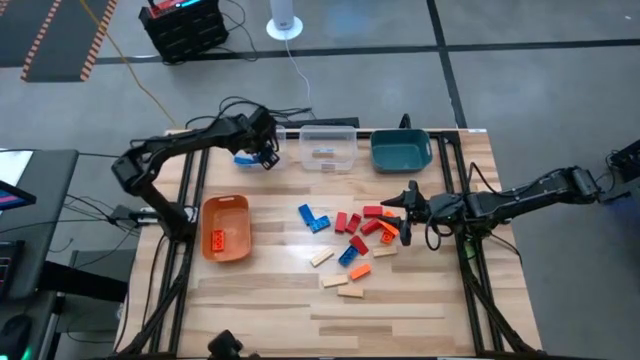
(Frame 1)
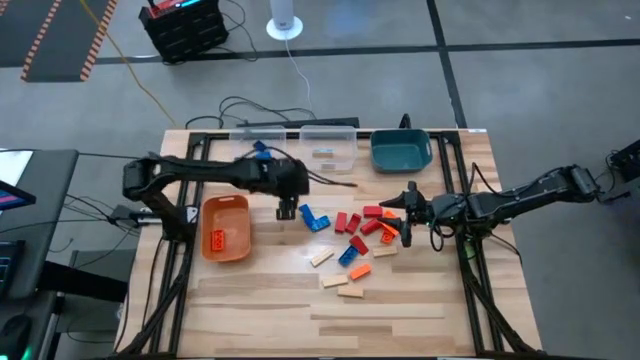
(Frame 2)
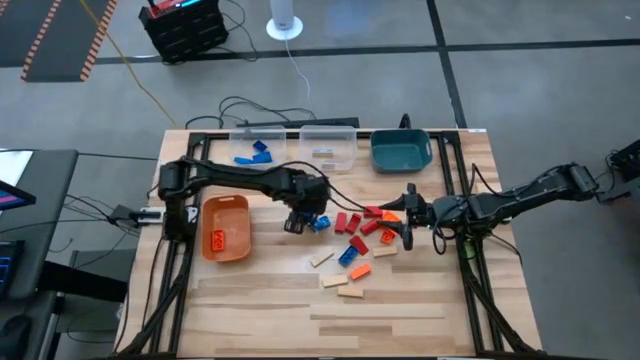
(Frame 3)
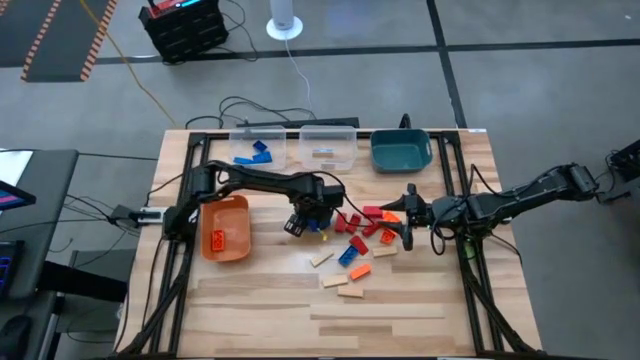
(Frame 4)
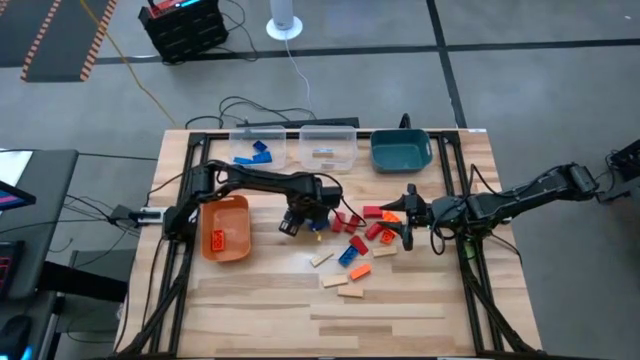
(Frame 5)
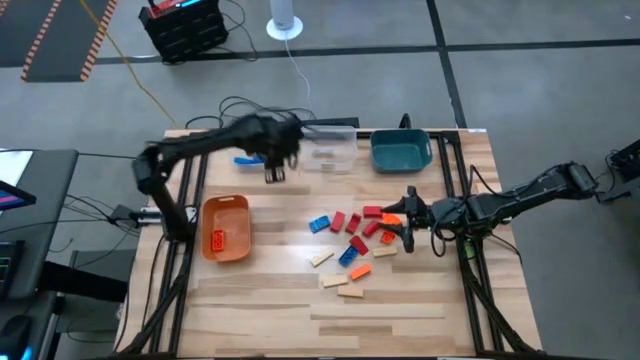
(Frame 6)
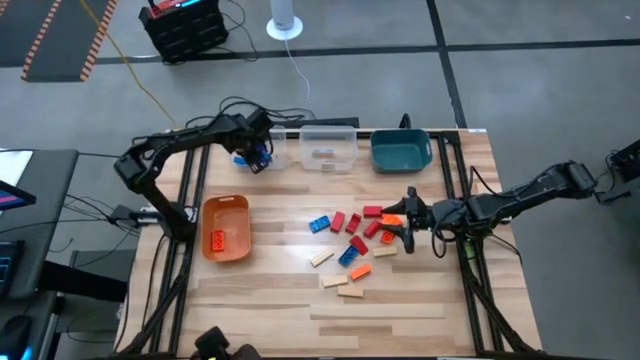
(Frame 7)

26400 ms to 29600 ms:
Task: Sort blocks
Put the blue game piece into the left transparent bin

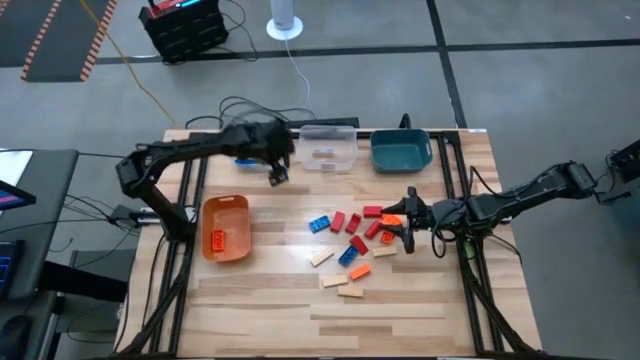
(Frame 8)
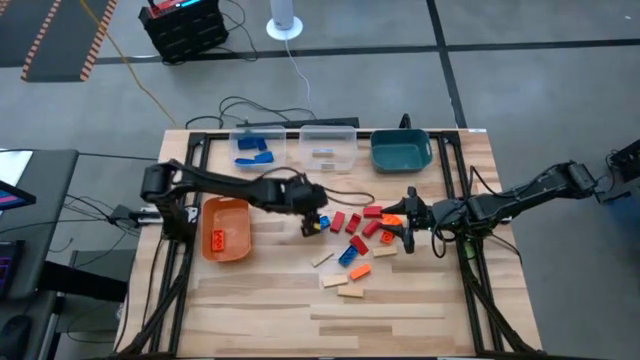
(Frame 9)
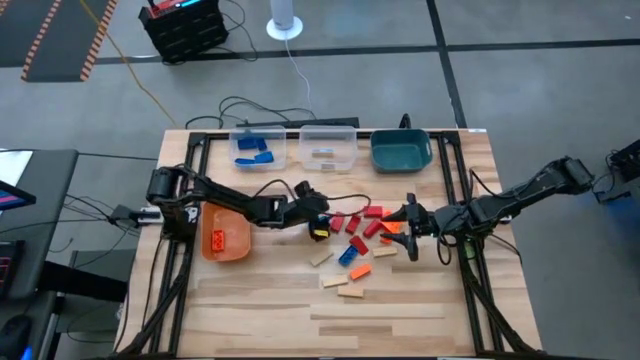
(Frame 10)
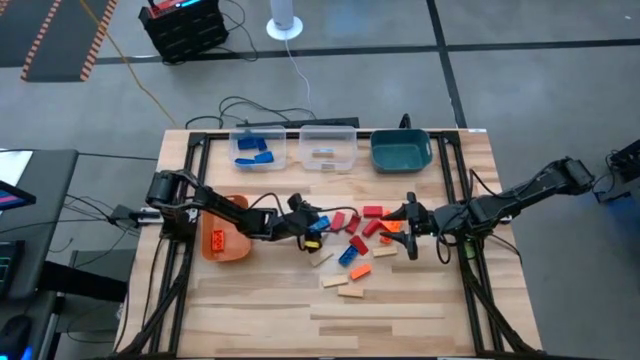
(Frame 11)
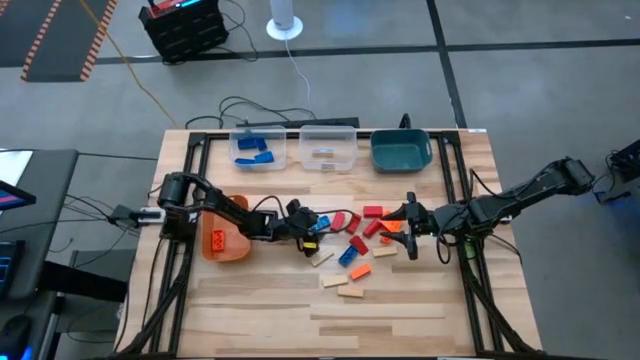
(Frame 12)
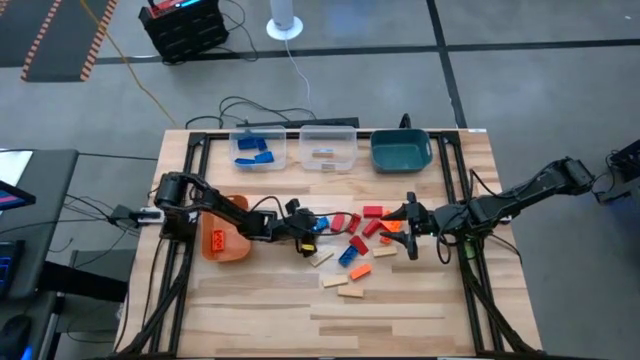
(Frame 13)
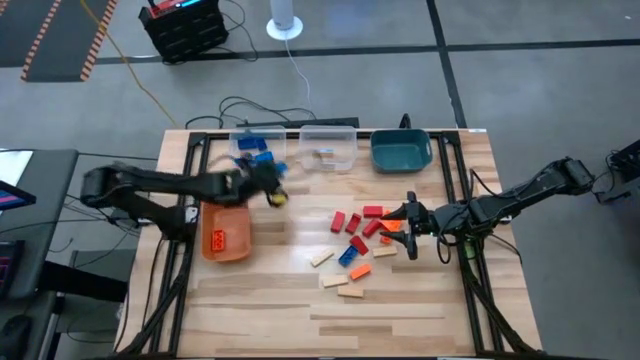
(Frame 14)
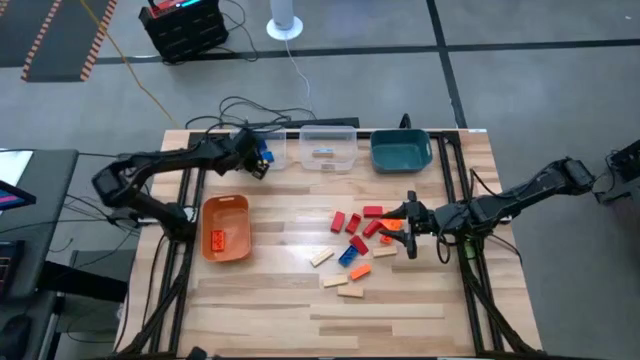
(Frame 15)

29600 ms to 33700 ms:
Put the blue game piece into the left transparent bin

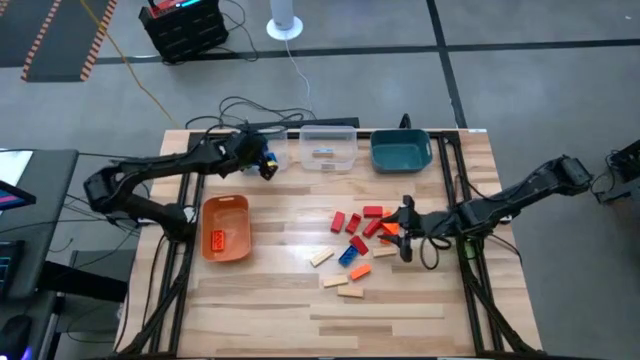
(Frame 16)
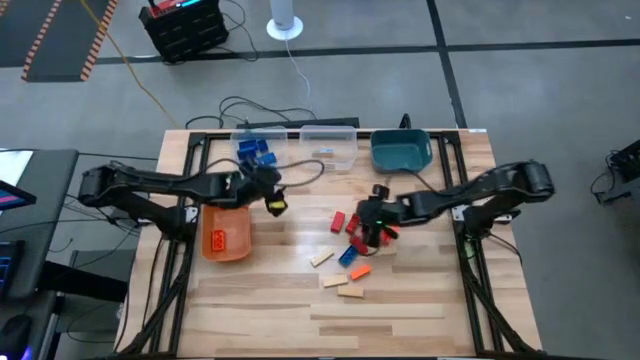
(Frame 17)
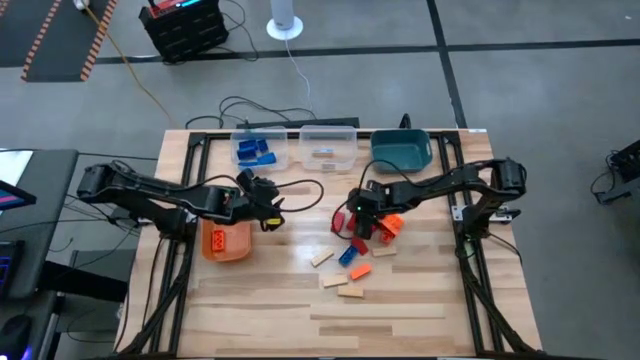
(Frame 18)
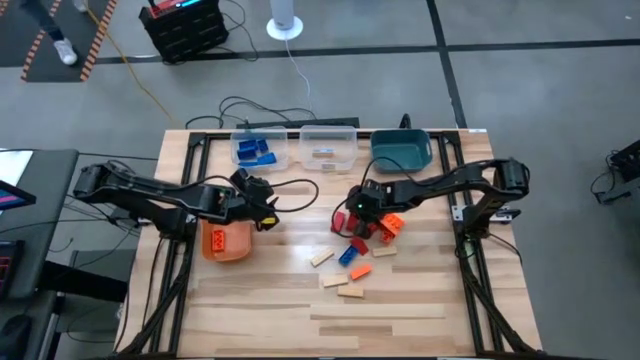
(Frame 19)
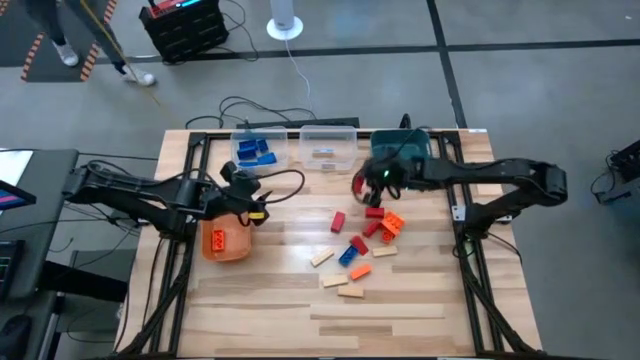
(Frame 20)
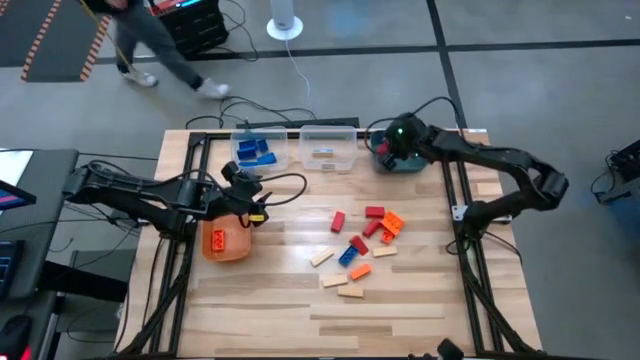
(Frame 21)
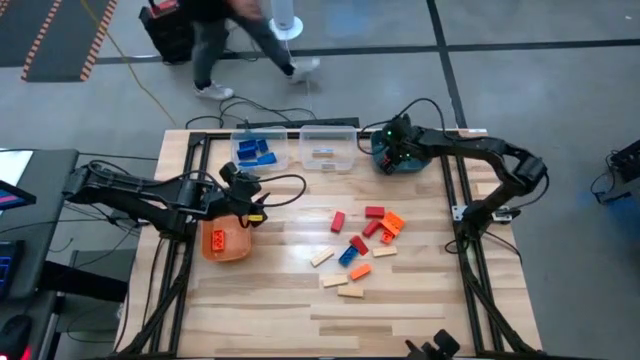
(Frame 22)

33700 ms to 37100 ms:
Put the red block into the blue bin

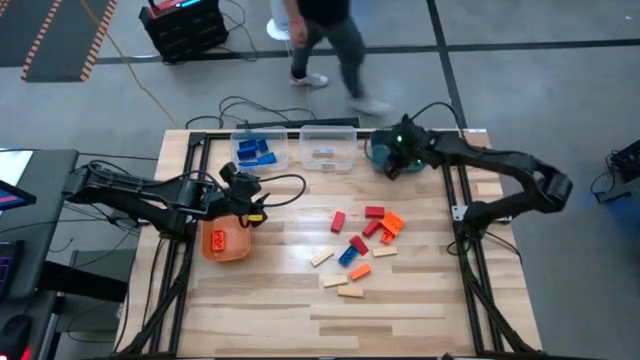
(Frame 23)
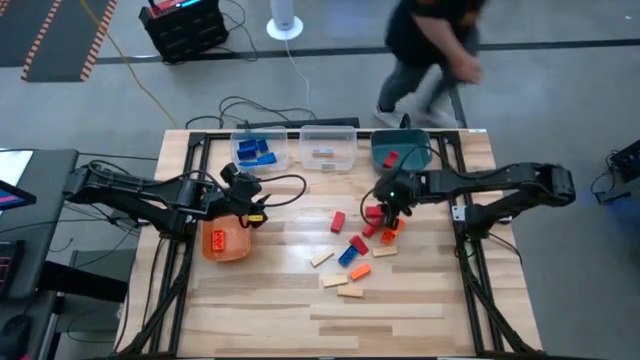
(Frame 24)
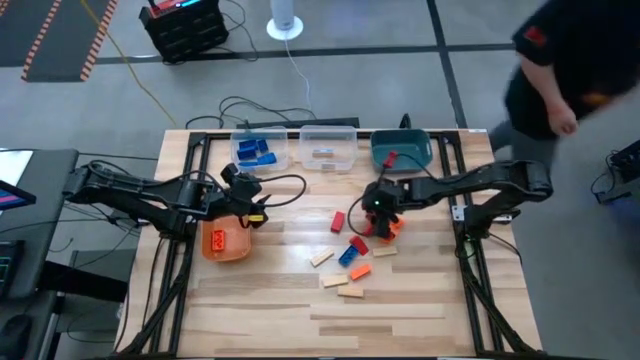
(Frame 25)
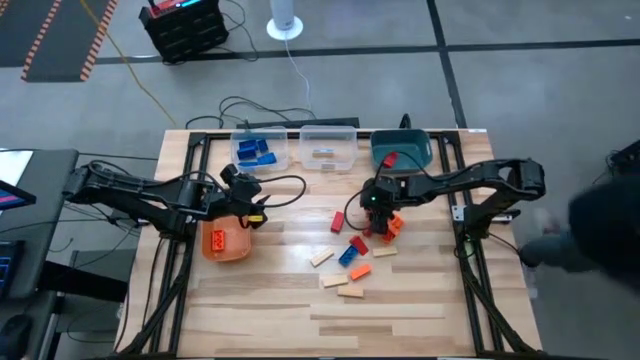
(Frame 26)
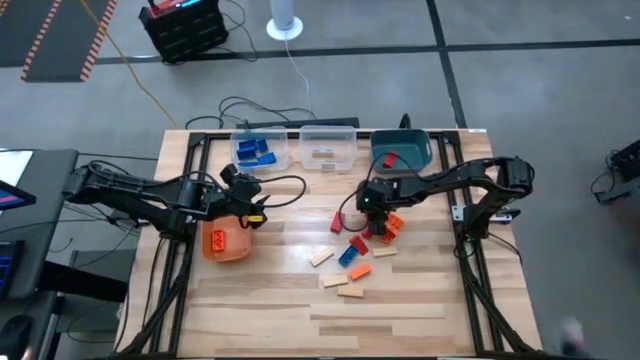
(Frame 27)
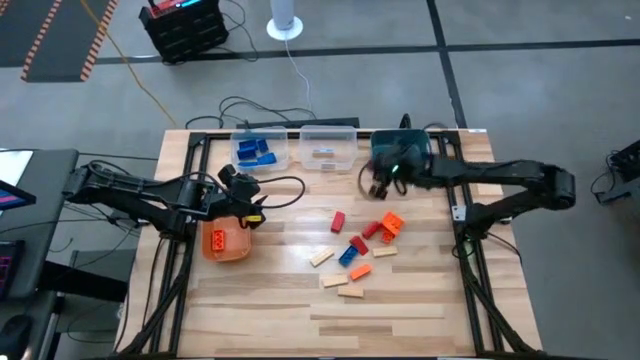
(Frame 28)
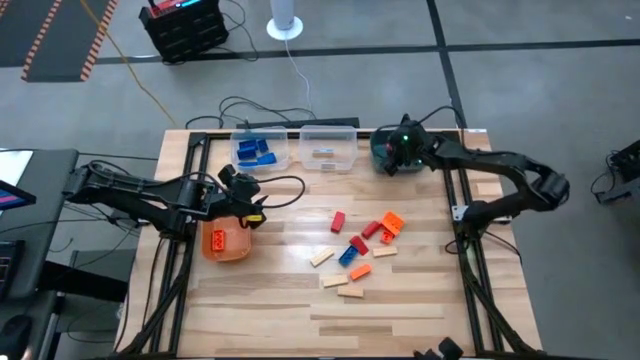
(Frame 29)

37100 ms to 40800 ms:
Put the red block into the blue bin

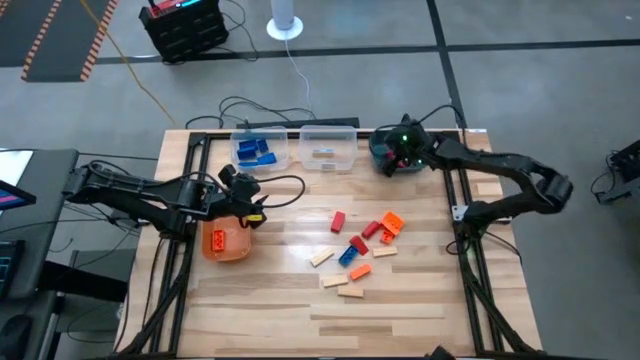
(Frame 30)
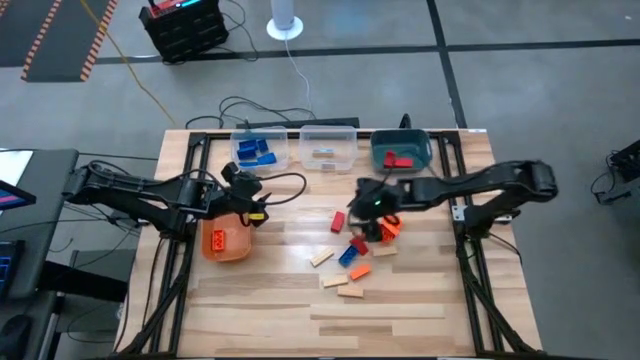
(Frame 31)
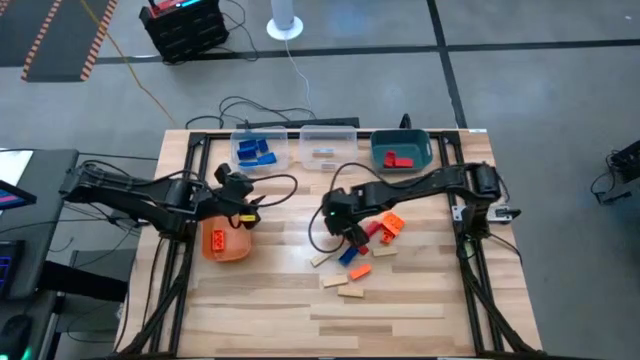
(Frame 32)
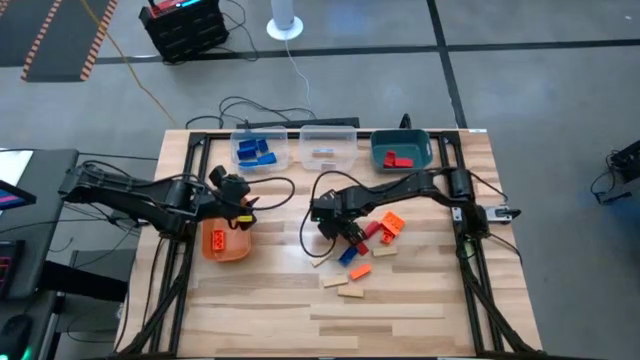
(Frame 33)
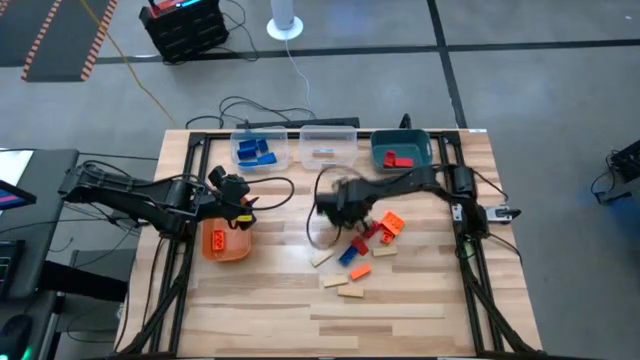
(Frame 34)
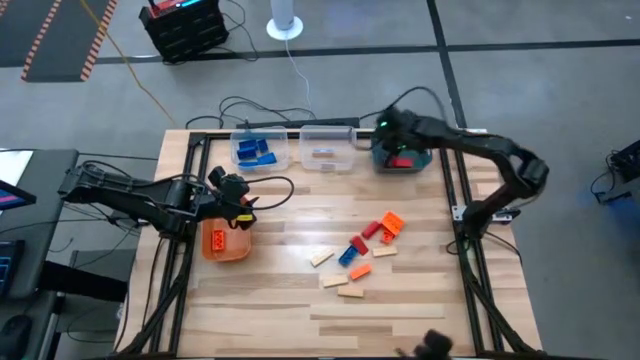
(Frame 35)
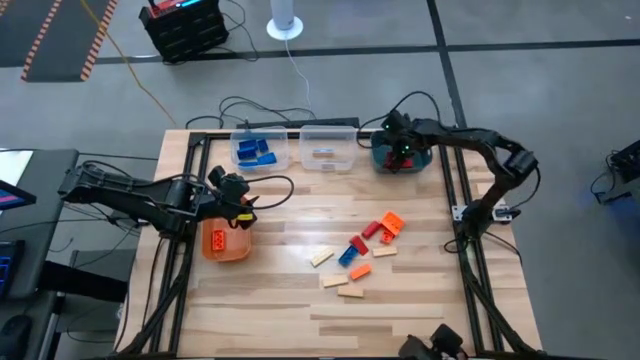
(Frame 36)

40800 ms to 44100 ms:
Put the red block into the blue bin

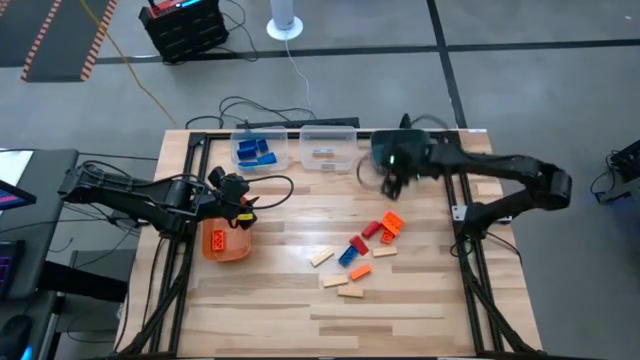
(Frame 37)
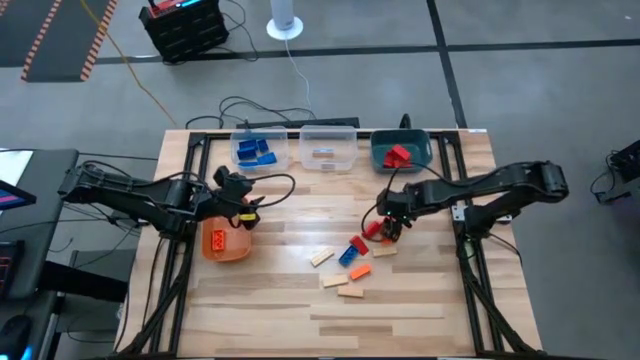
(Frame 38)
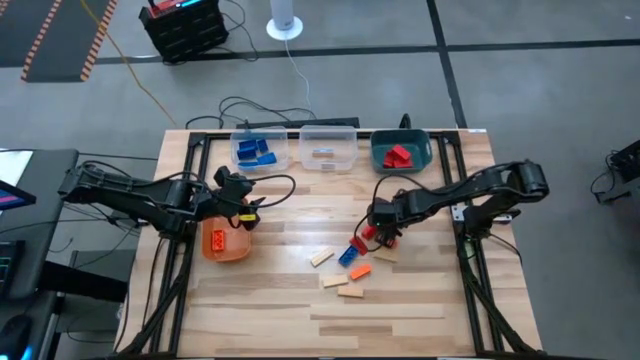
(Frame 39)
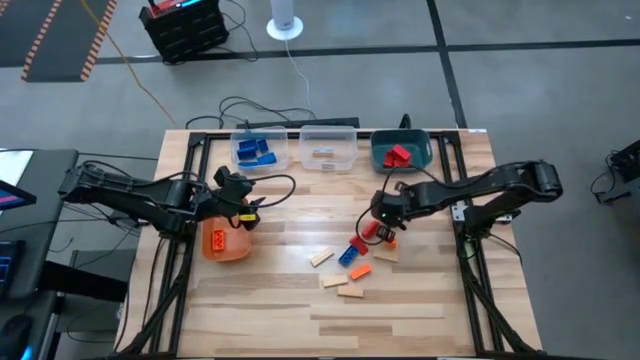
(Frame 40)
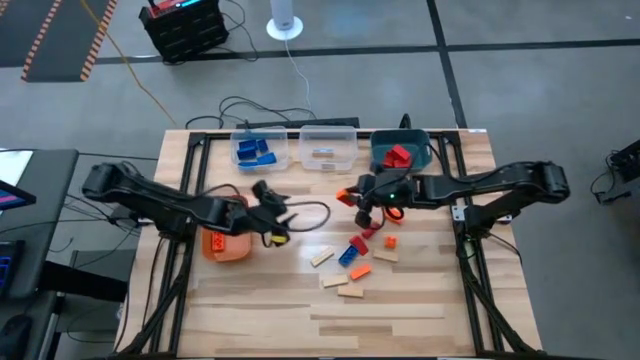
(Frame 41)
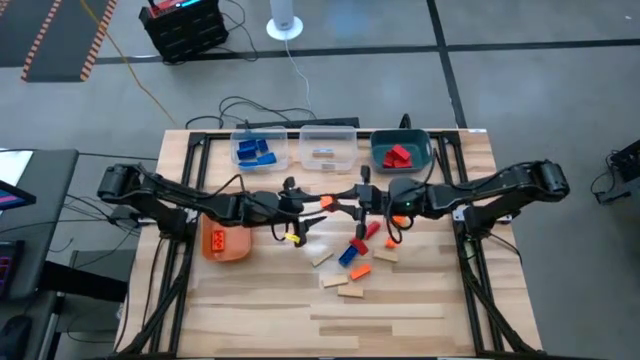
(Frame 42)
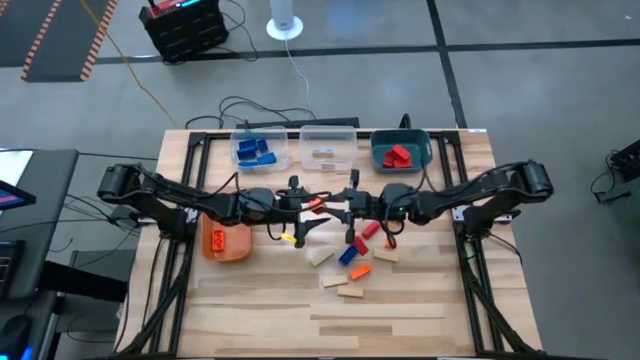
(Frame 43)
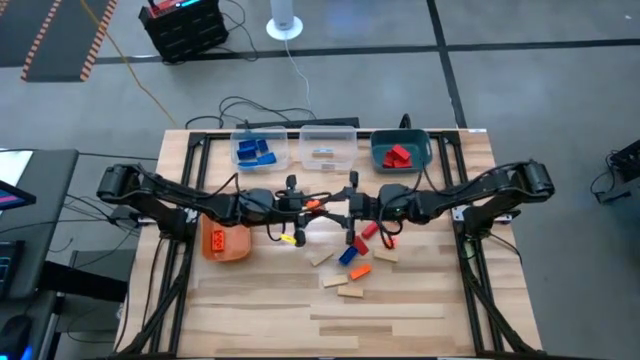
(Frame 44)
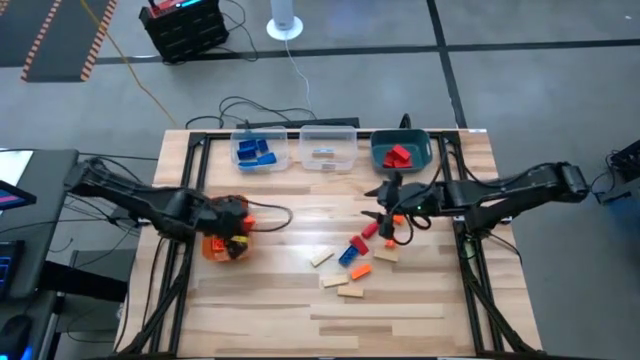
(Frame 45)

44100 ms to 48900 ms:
Put the orange game piece into the orange bin
